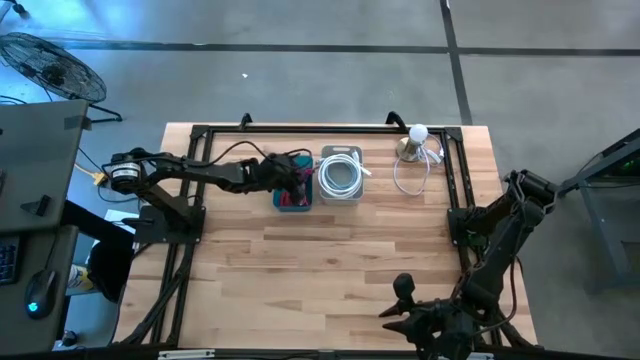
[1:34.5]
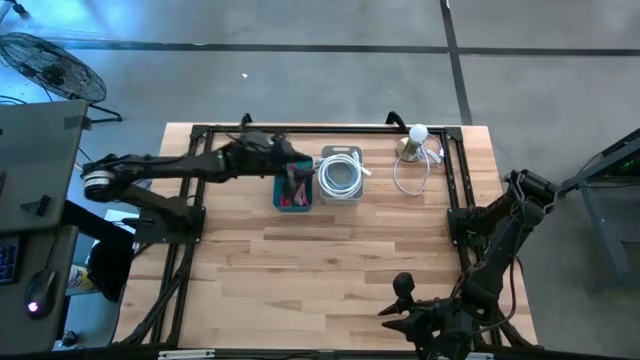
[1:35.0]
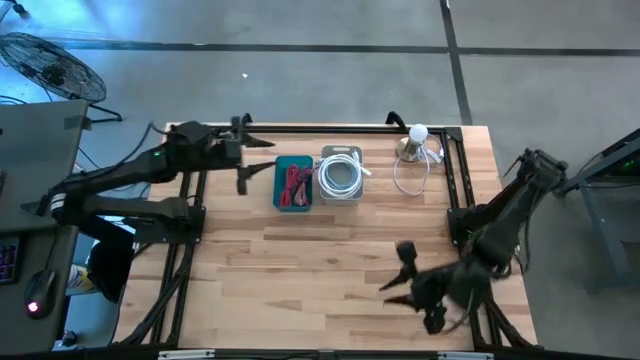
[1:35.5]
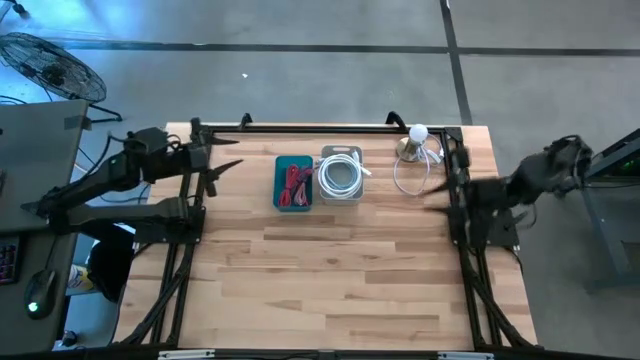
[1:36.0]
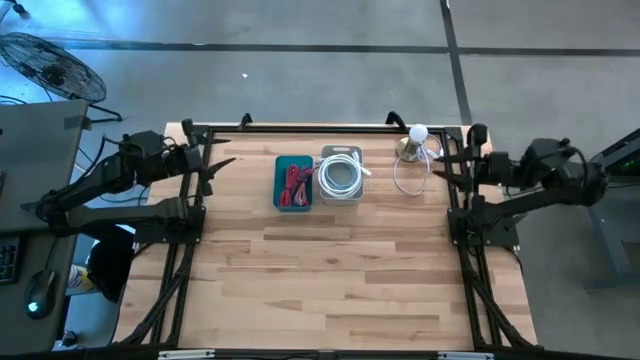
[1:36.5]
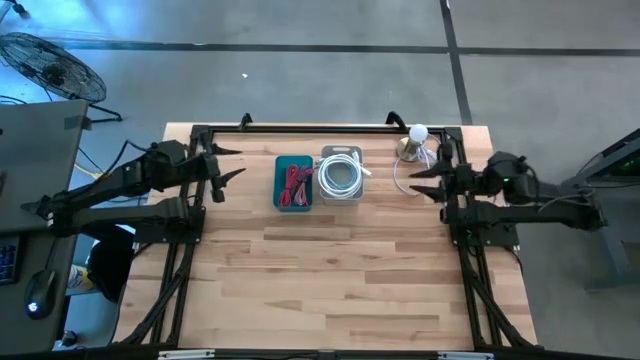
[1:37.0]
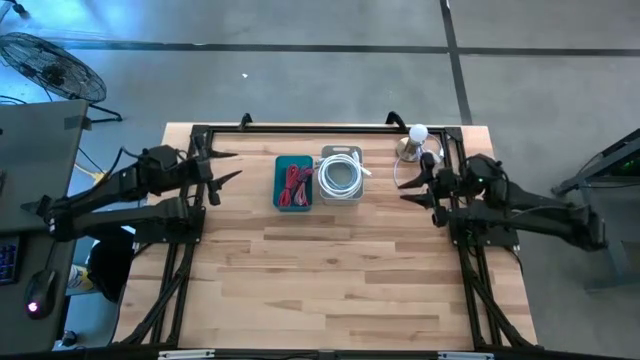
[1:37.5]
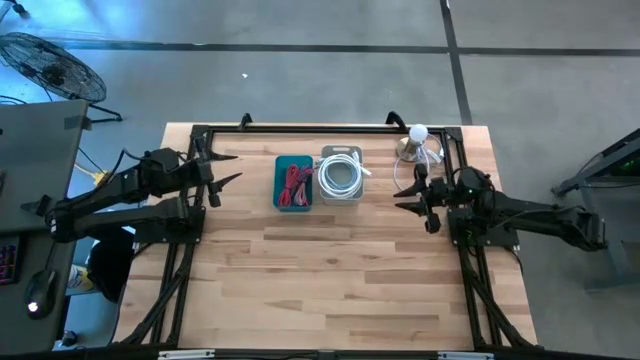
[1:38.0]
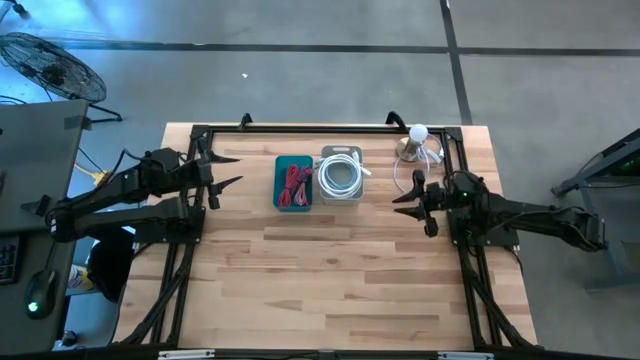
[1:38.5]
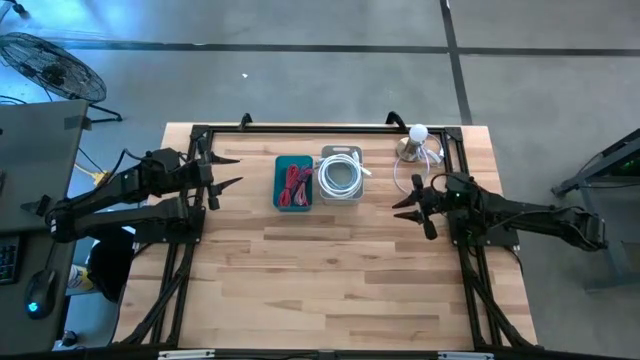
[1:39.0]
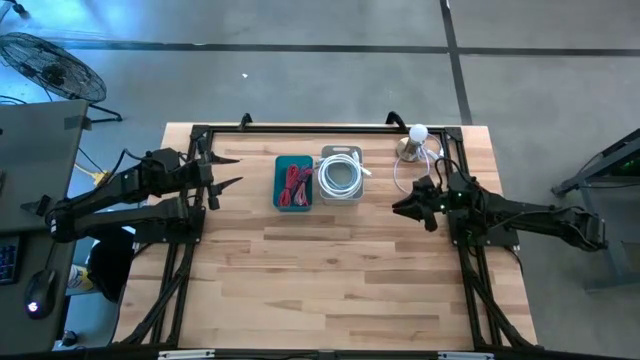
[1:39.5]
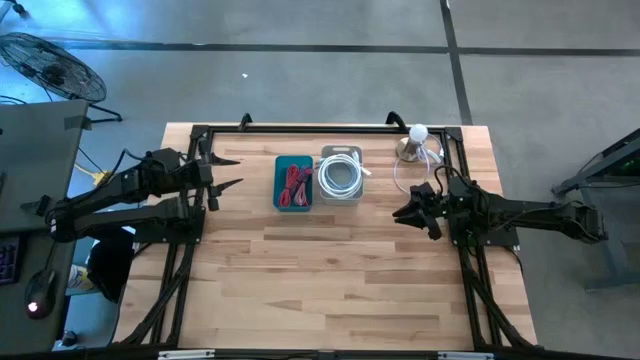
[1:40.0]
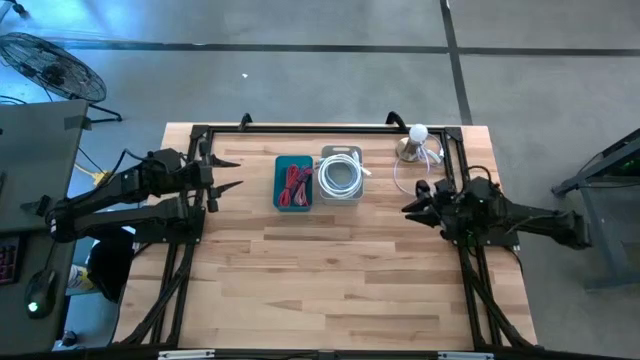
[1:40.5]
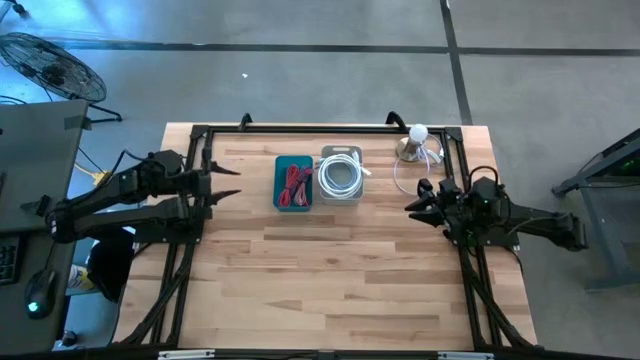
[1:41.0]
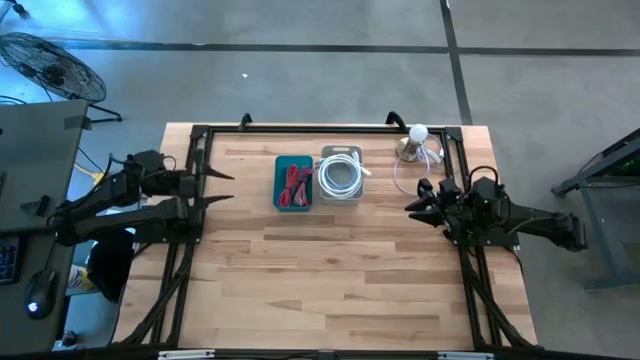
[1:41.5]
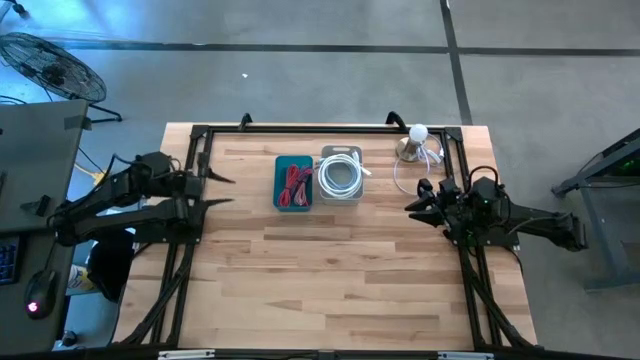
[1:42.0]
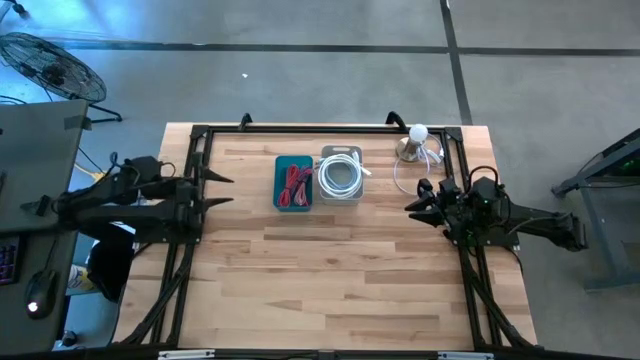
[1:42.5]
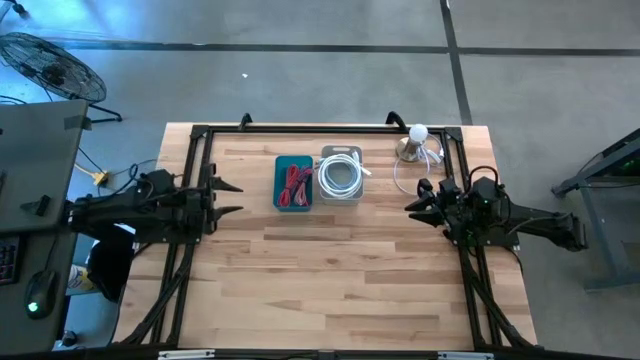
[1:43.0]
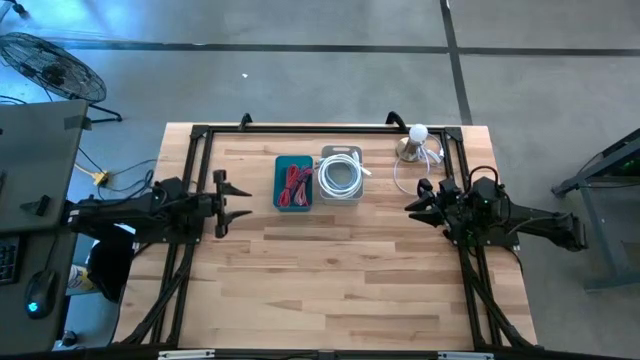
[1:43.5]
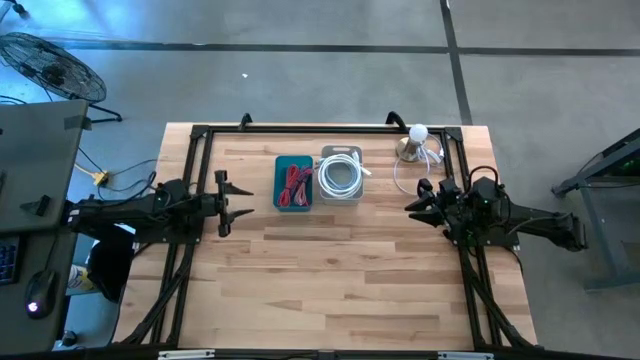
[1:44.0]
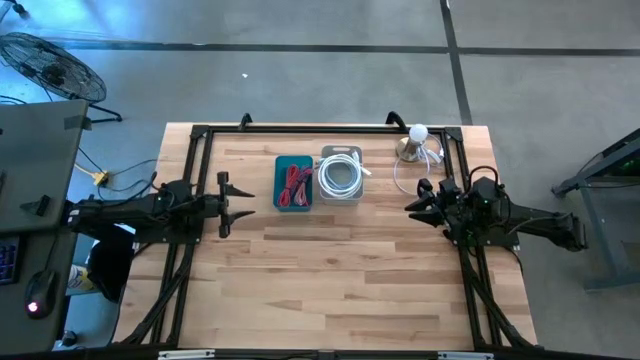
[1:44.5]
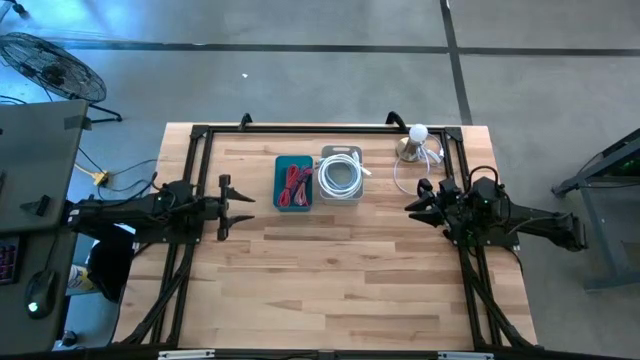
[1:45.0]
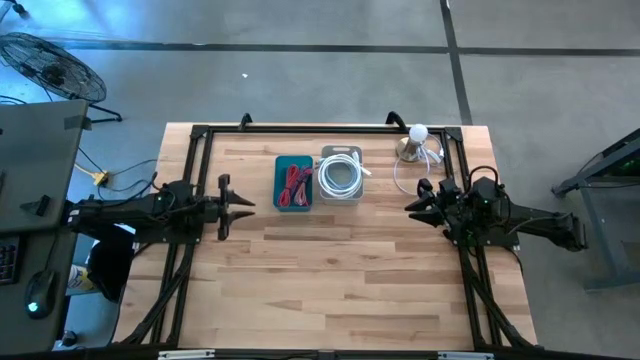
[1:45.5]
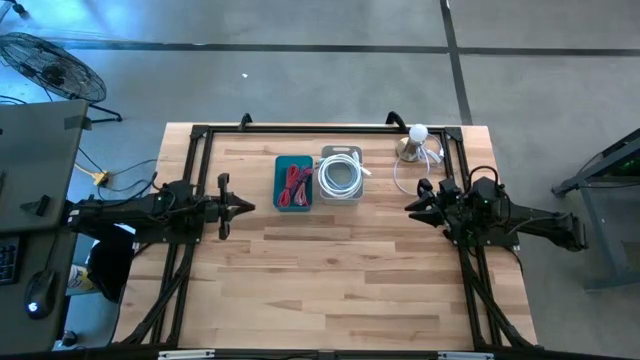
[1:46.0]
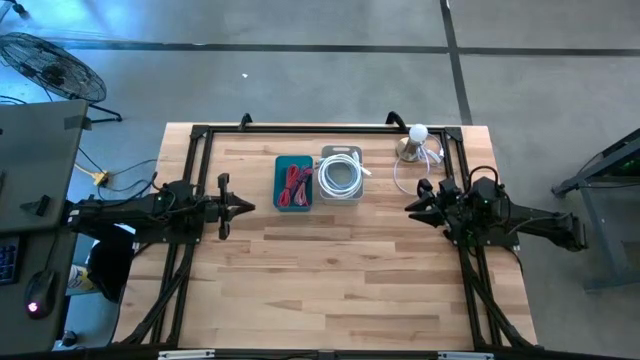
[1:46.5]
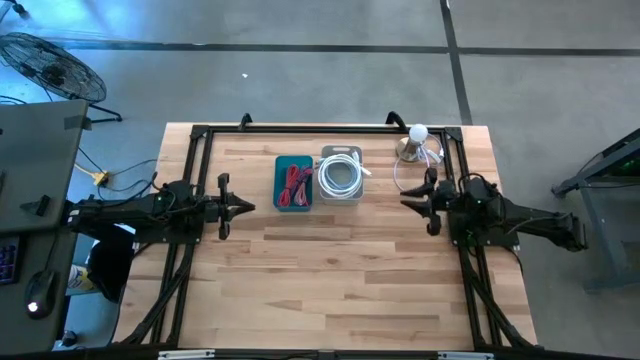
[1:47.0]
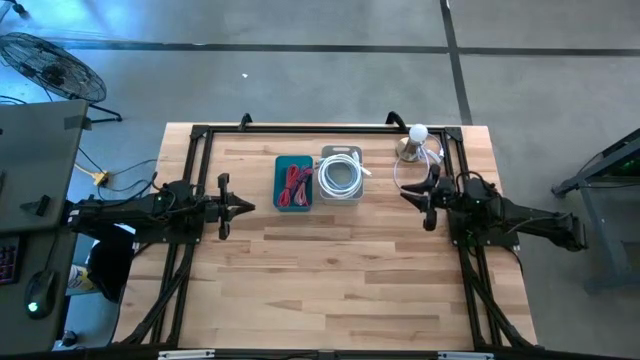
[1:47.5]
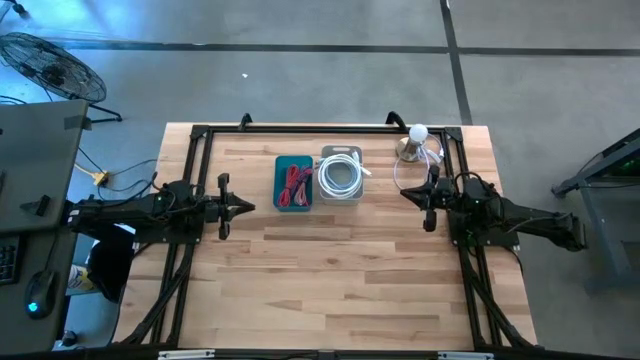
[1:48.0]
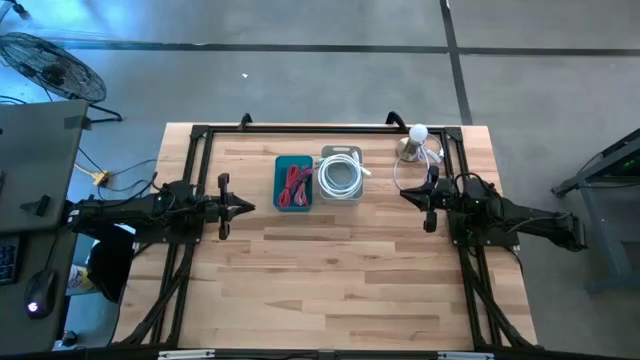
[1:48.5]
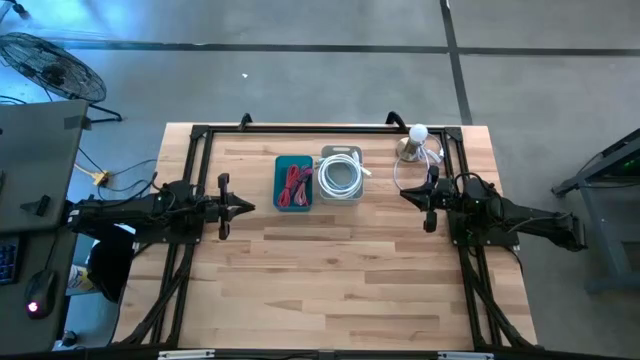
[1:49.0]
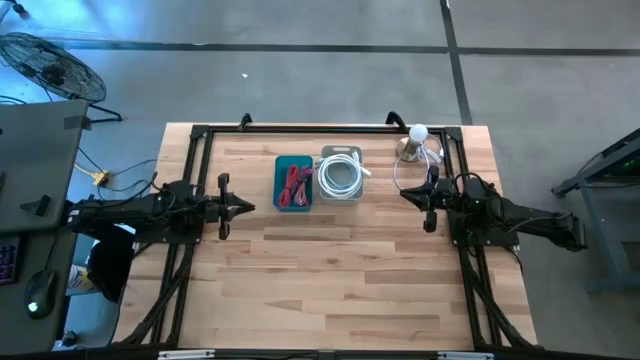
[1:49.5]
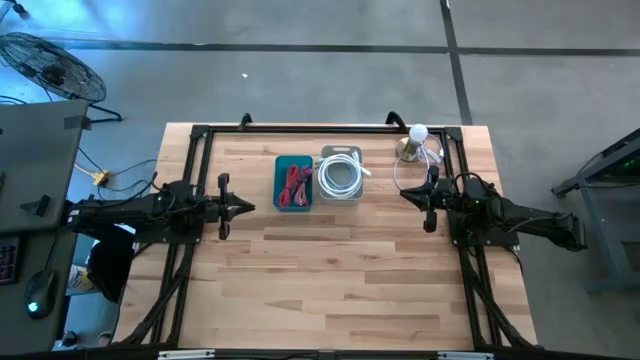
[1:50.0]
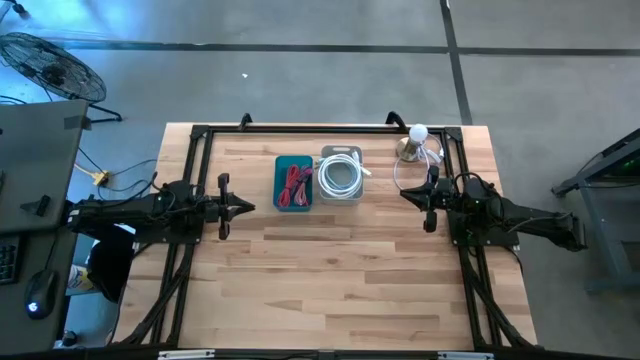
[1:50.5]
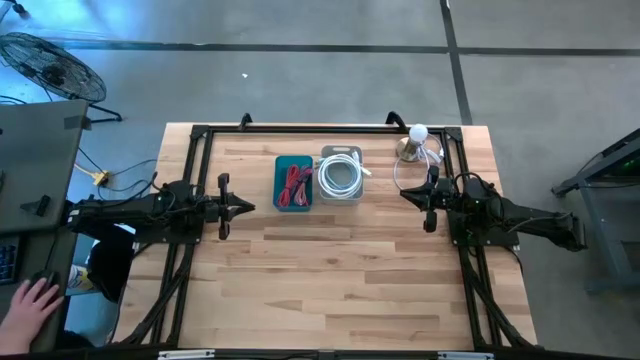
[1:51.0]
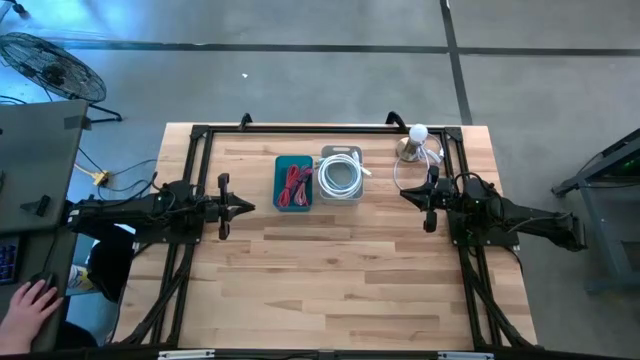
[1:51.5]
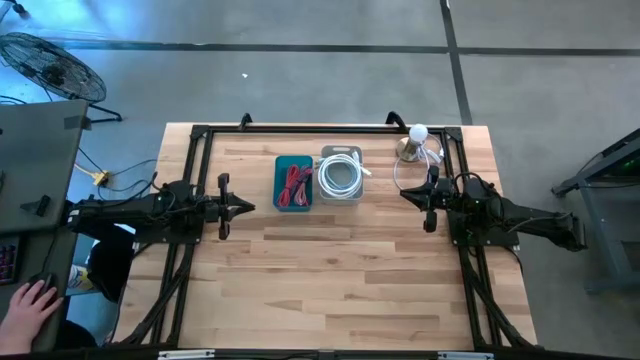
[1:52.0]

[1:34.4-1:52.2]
Task: Pick & Place USB Port
Return to Home Position

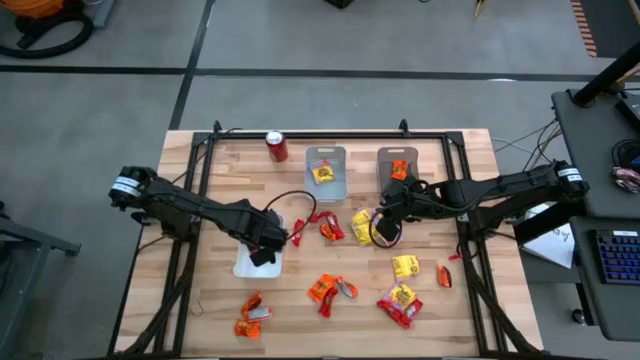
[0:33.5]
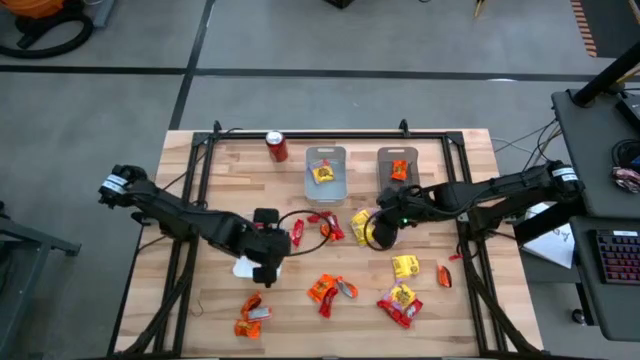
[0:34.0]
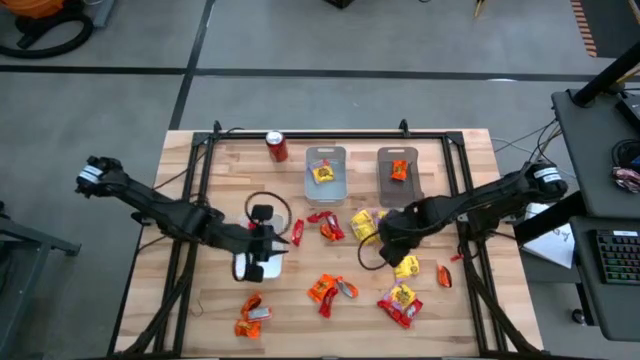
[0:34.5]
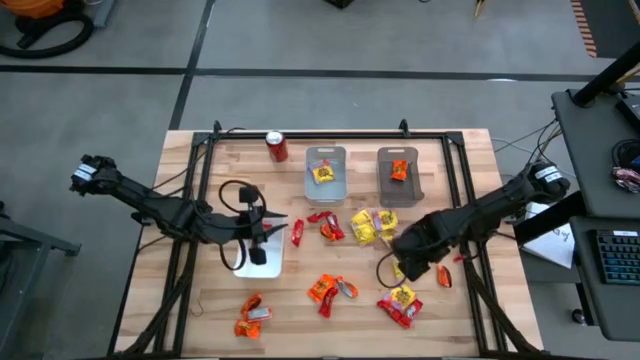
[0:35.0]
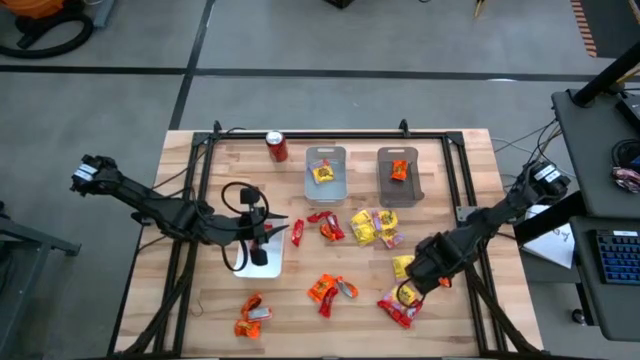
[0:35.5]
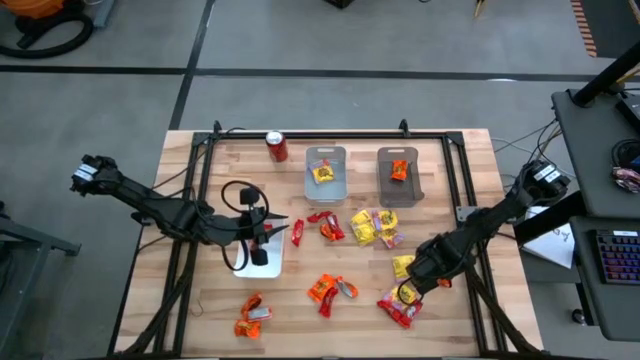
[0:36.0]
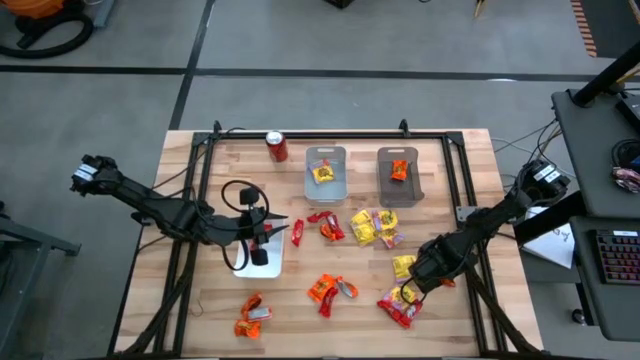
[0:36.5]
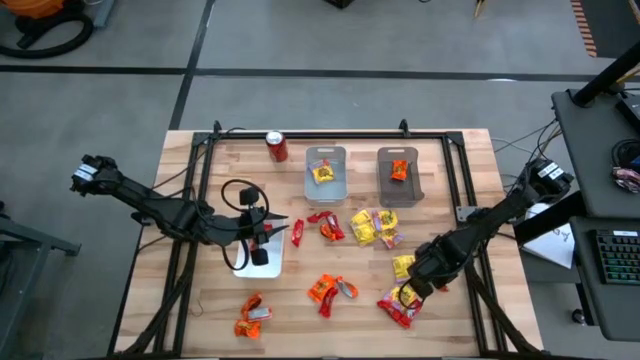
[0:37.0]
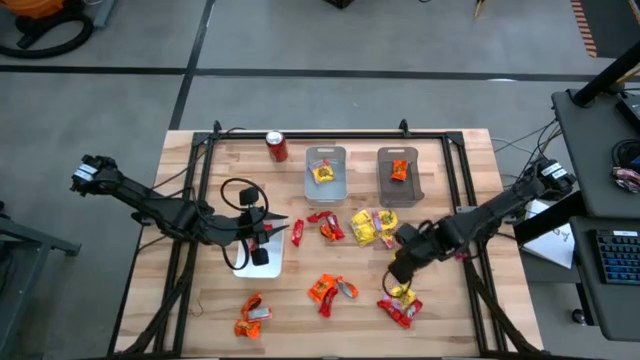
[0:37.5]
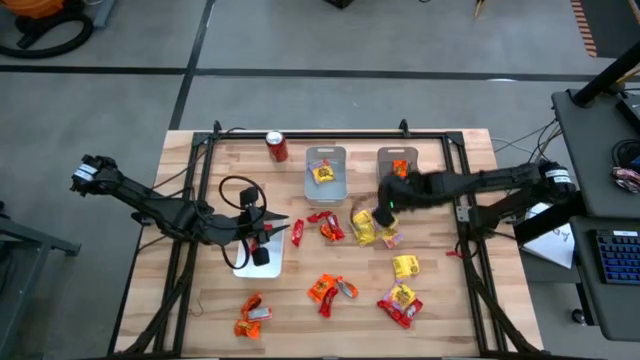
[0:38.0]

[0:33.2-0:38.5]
Task: Sort candy
Put the orange candy into the black bin
